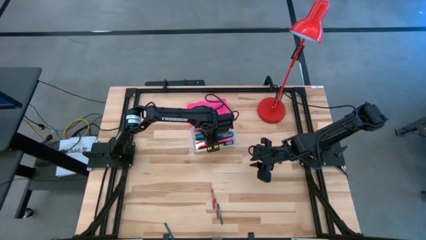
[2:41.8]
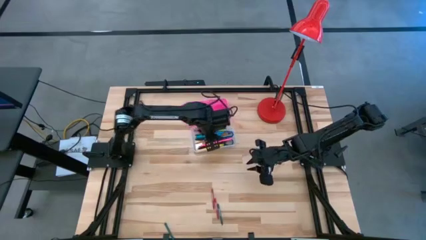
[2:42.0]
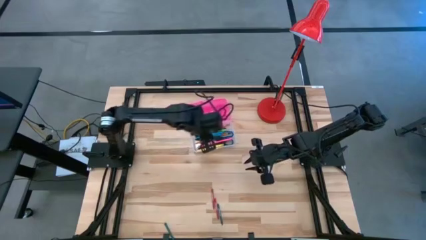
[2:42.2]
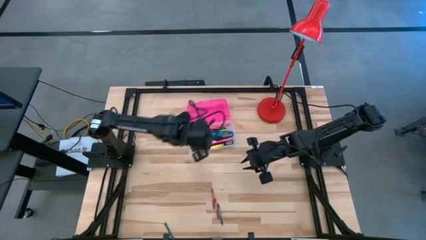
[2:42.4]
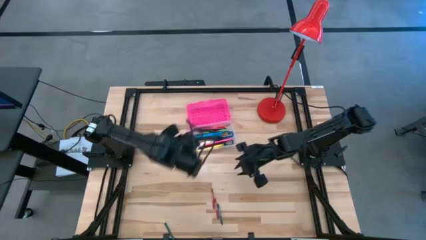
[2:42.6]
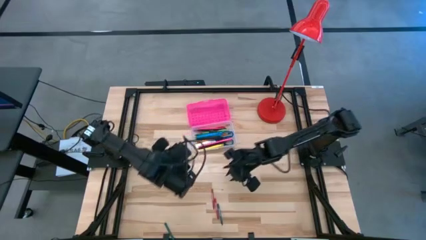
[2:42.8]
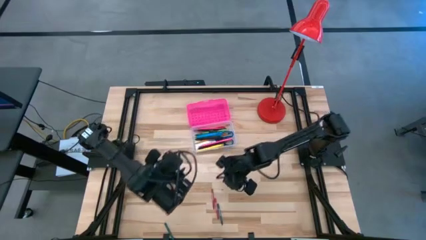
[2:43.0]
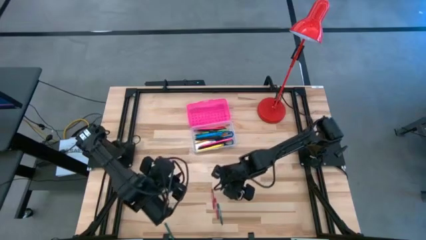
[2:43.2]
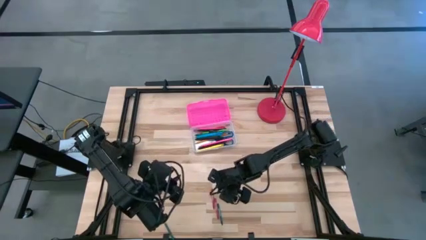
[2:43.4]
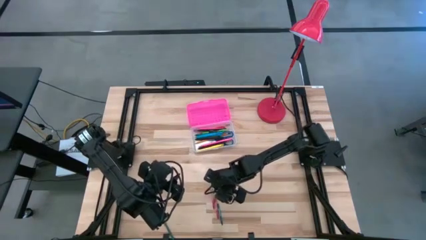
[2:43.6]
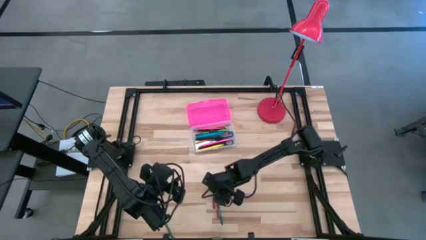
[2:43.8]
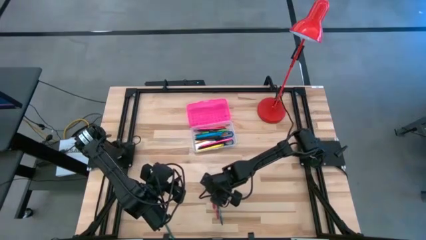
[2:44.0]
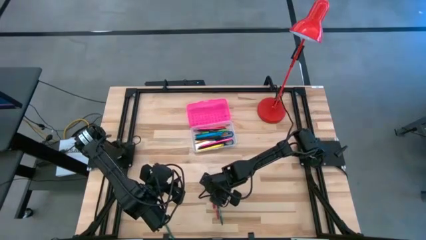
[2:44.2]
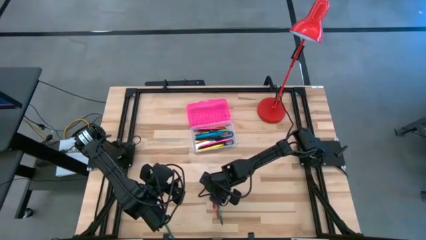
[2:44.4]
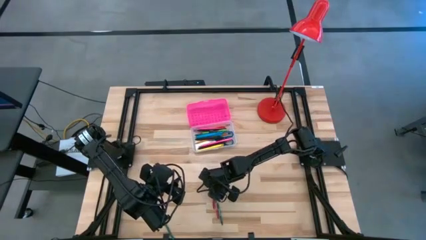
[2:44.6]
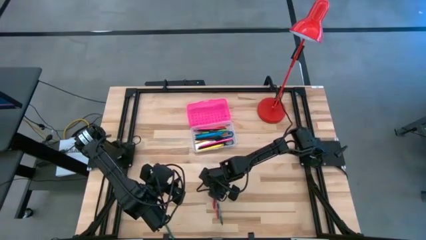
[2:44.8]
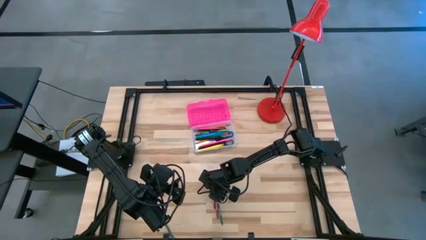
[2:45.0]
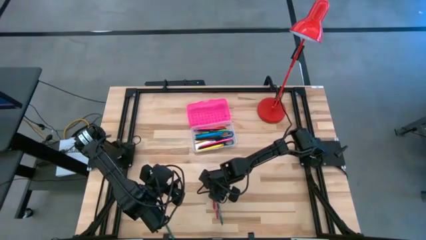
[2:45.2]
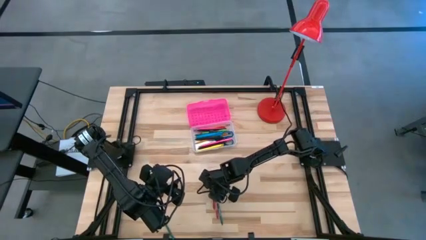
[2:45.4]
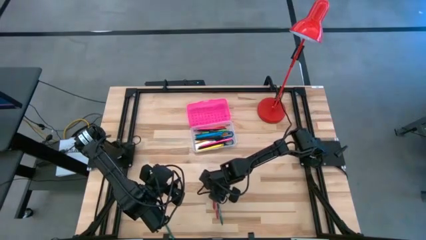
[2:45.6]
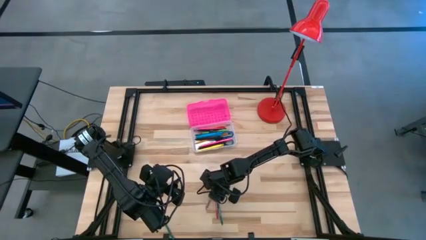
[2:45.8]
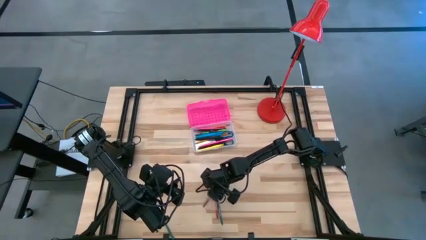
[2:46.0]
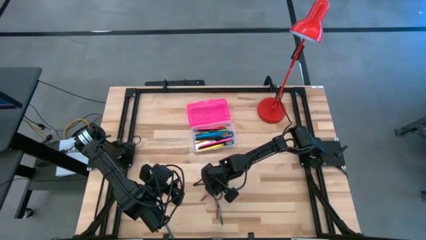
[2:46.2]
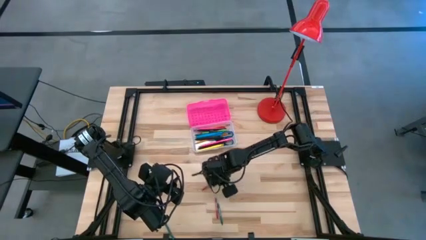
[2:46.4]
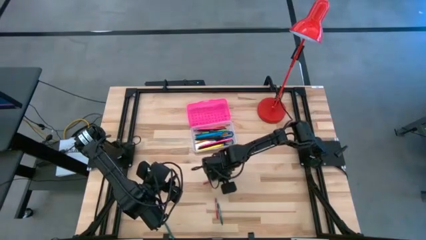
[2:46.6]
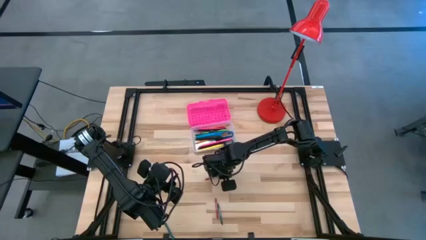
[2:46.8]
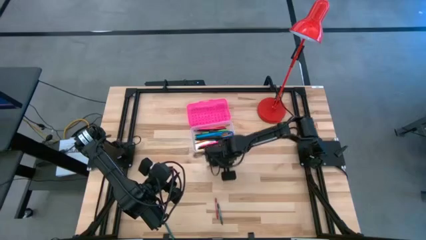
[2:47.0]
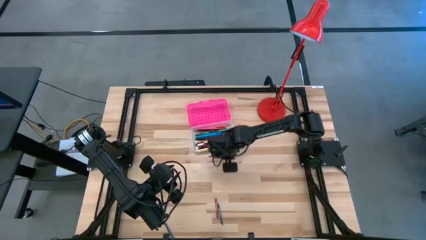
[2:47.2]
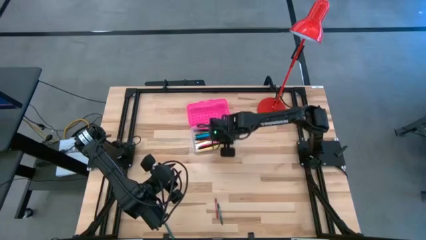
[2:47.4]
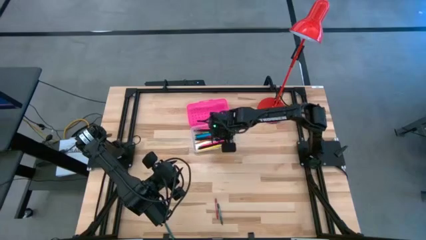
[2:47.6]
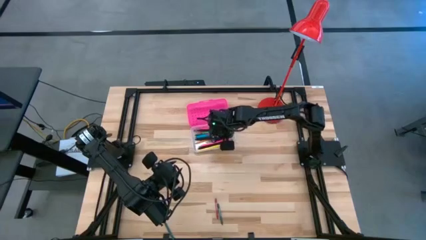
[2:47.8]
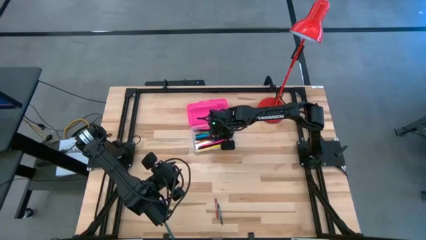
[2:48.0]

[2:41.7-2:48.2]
Task: Pick & place school supplies into a supply box
Put the red crayon into the pink supply box

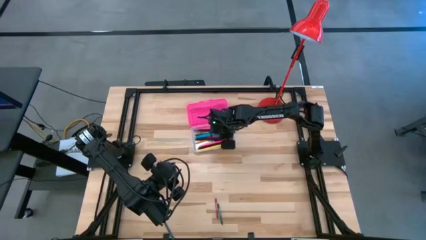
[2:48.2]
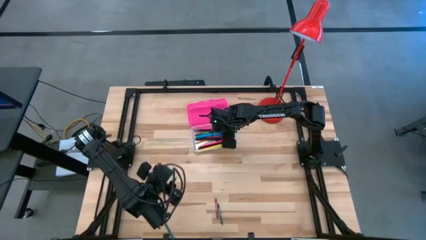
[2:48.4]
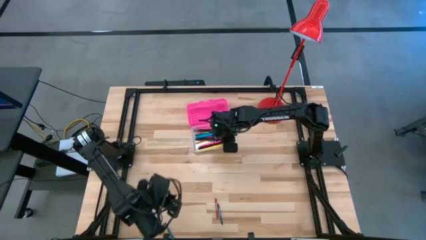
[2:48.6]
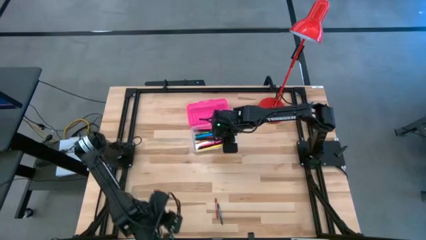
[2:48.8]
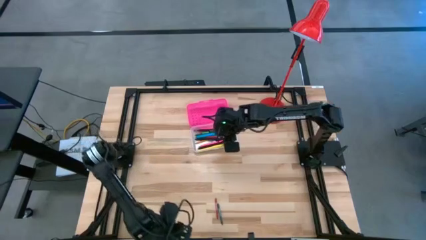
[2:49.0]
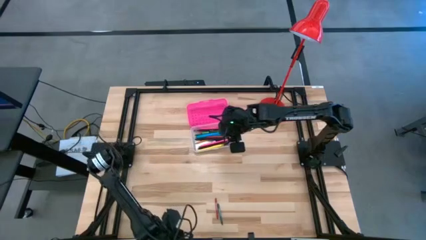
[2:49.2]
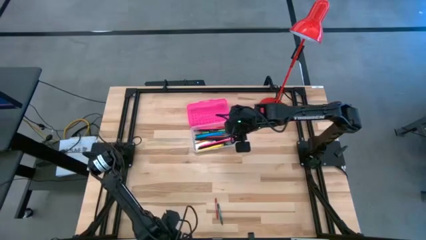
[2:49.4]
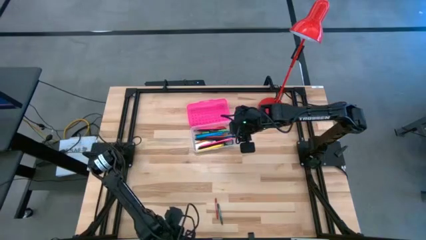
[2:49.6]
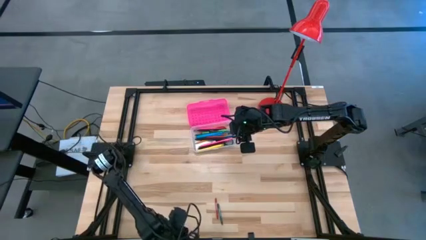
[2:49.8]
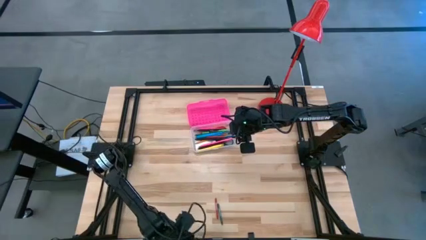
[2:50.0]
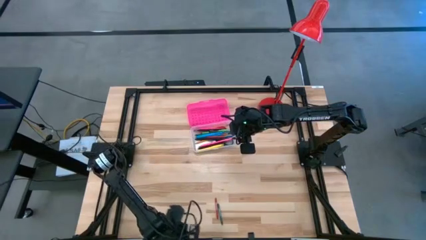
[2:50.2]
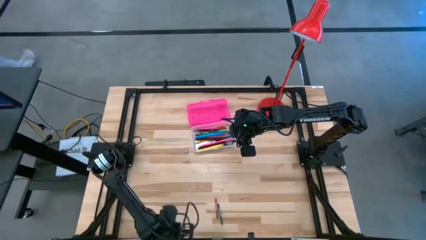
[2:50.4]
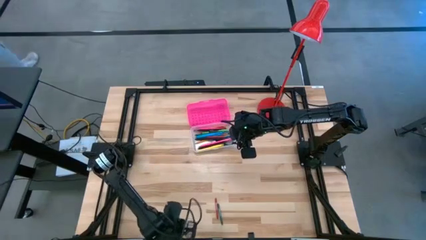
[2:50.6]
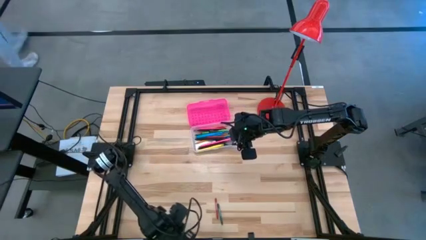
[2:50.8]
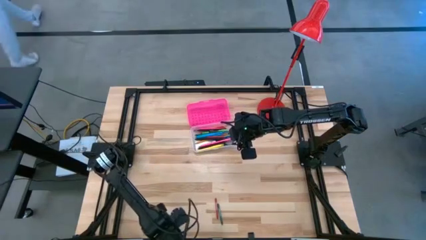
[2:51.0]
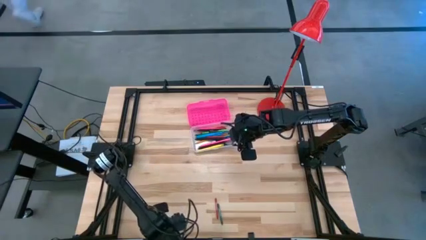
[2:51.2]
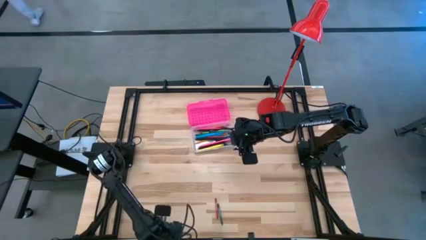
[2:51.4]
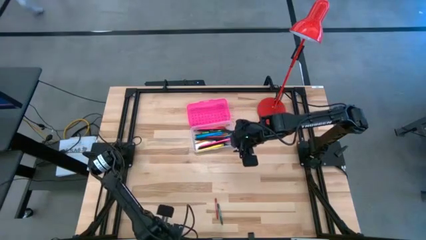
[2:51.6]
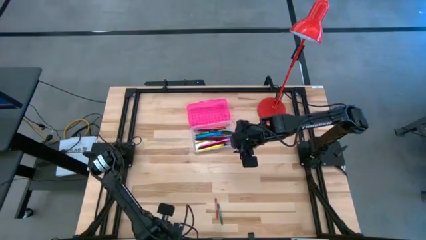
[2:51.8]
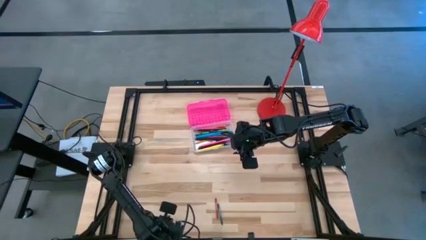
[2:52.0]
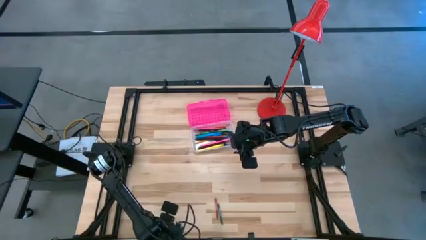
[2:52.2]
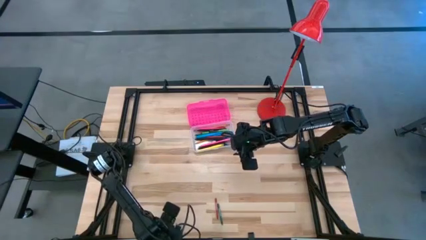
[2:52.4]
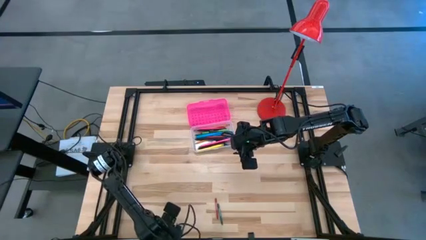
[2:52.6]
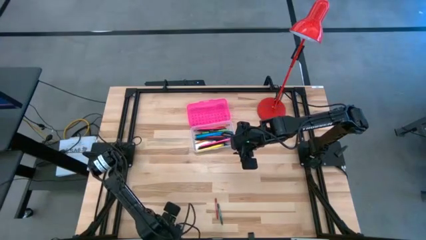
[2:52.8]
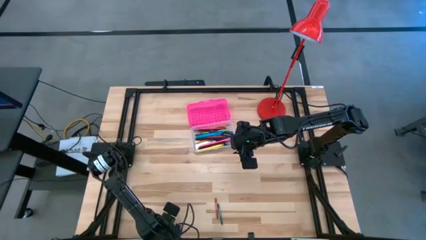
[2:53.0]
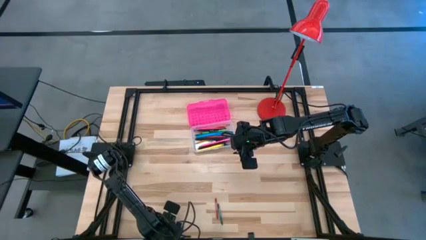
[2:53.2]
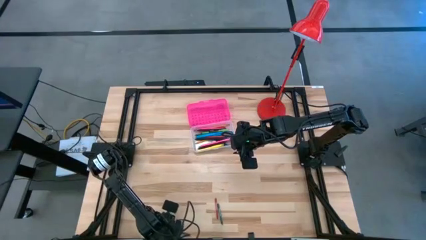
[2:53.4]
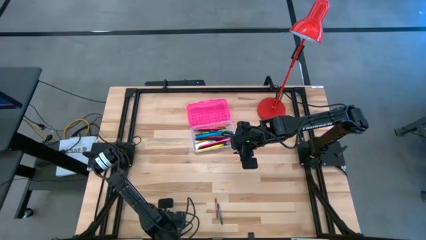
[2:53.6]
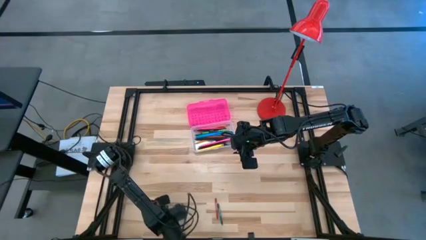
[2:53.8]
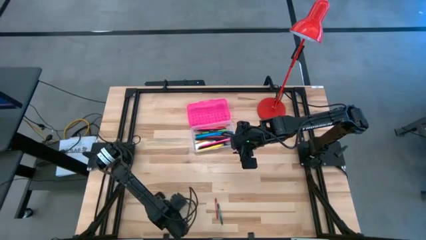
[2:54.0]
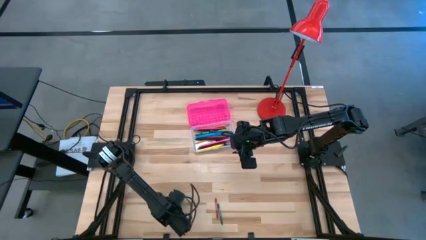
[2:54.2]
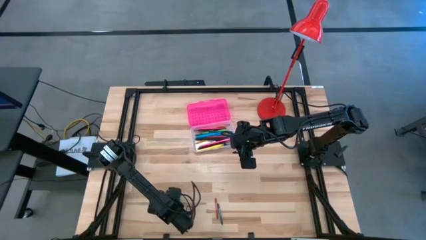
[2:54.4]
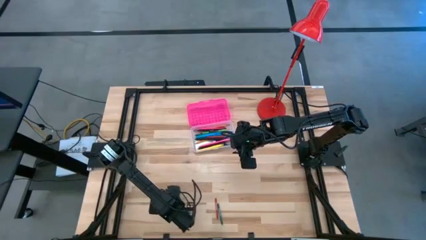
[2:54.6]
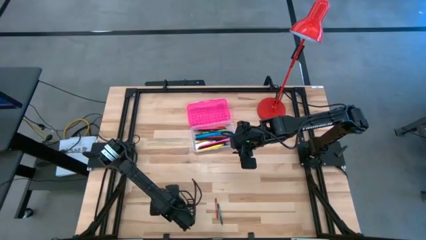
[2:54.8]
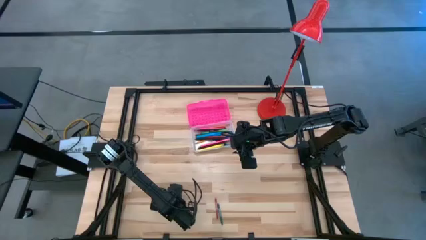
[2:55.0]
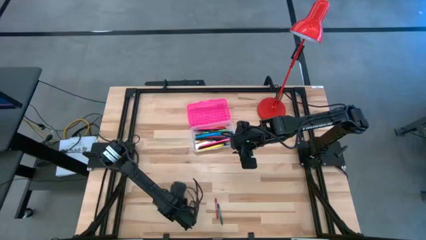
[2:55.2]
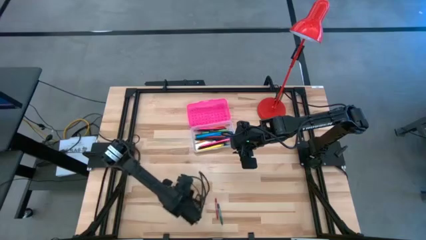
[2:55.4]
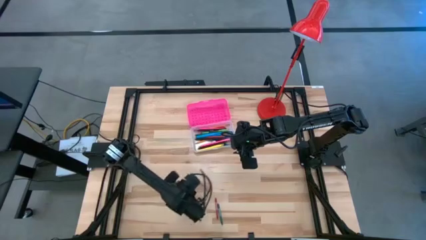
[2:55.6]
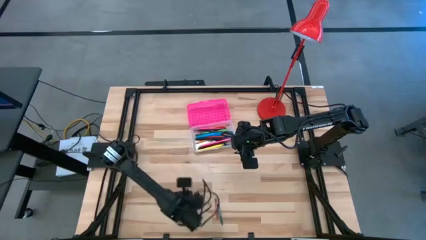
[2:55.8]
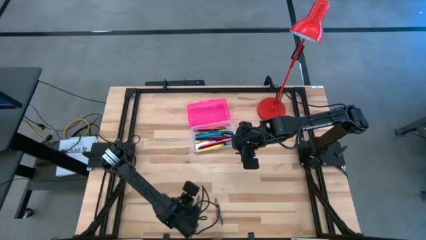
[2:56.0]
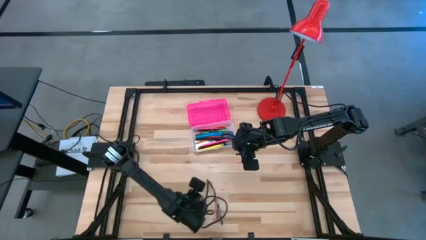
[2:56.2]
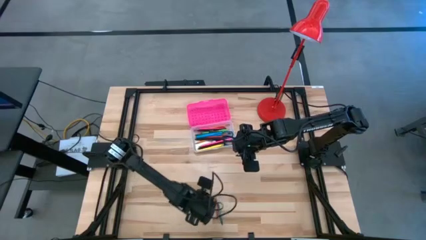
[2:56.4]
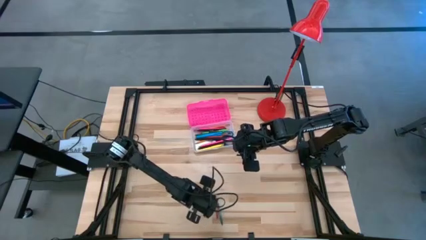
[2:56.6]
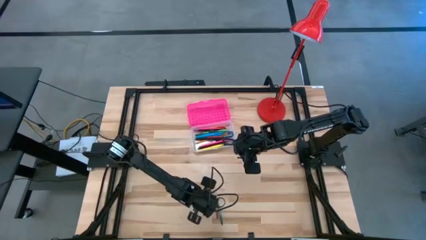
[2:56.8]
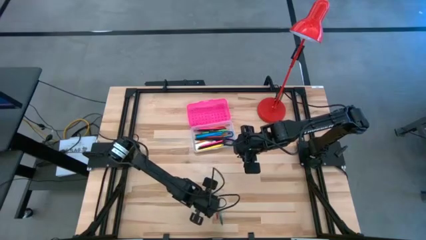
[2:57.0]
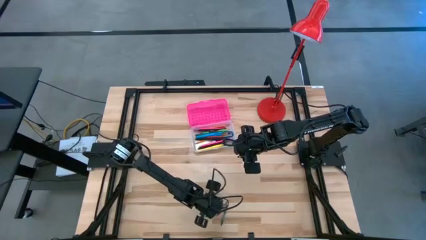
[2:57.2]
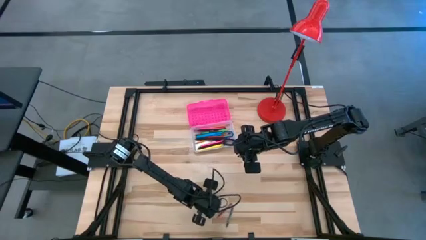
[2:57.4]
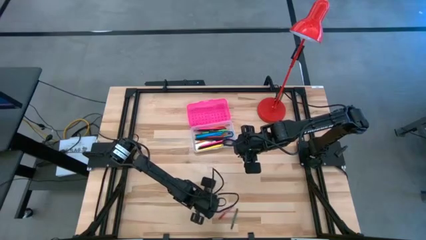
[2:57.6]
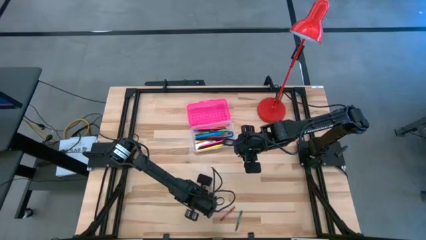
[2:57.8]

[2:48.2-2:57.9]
Put the green crayon into the pink supply box

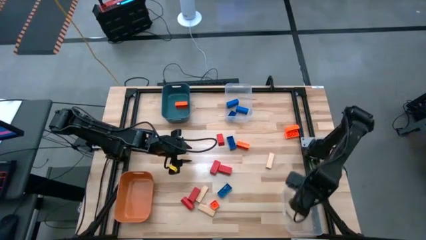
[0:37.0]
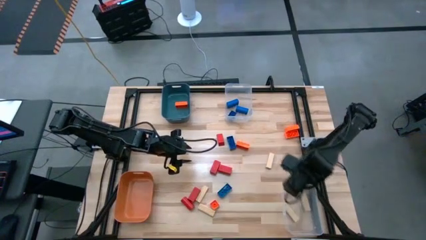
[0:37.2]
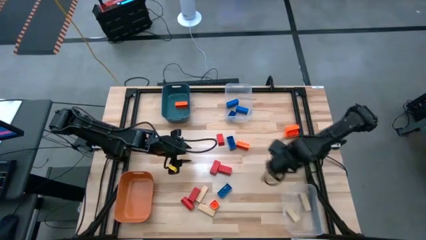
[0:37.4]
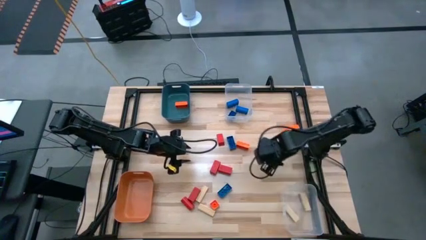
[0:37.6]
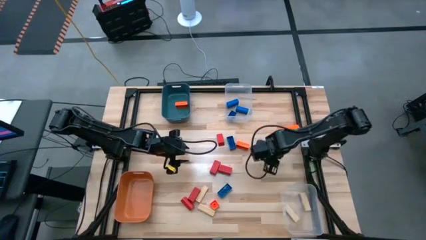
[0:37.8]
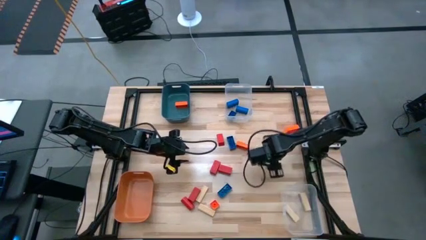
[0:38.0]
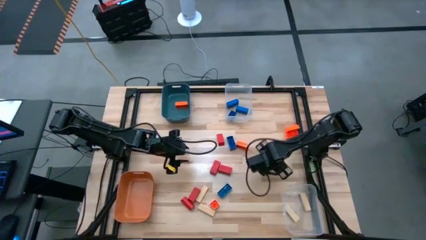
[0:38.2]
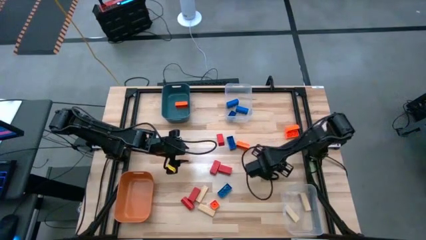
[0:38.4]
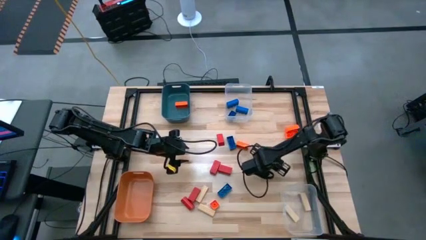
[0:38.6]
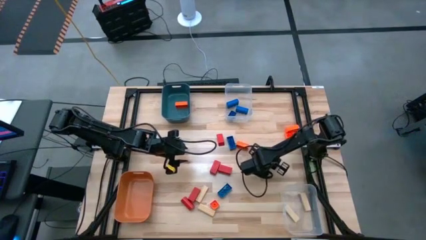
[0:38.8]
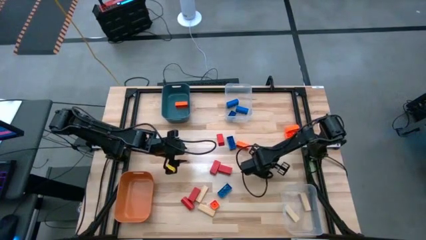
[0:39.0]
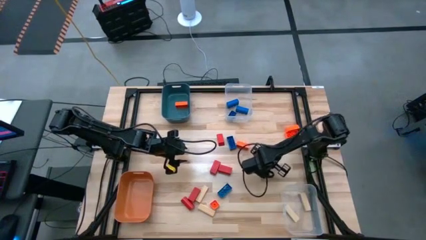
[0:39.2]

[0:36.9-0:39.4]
Task: Sort blocks
Put the brown block into the bottom transparent bin
